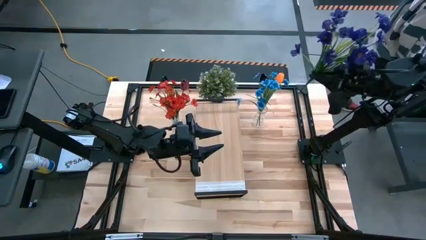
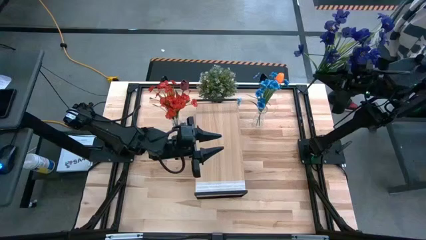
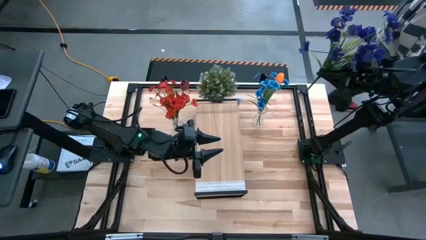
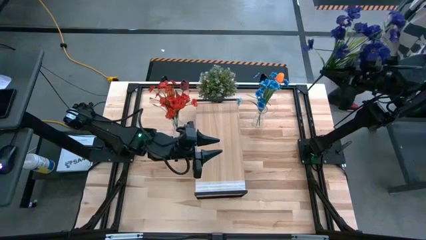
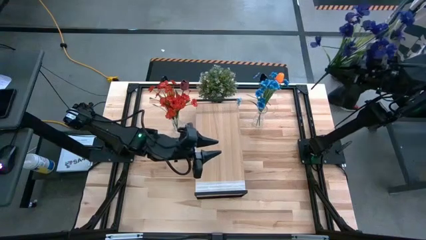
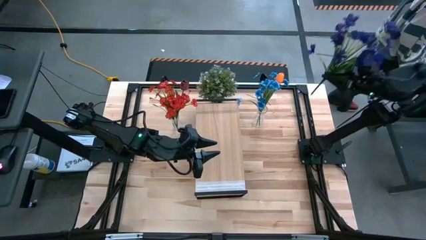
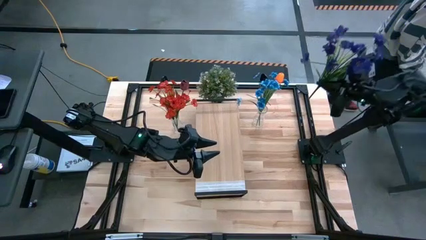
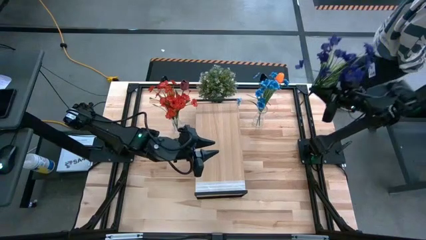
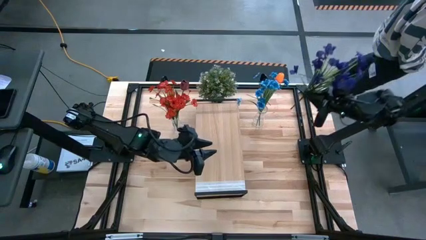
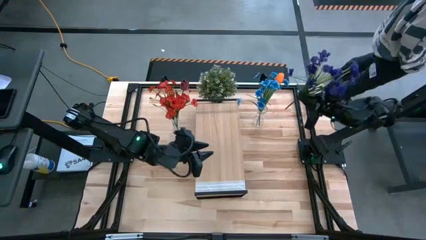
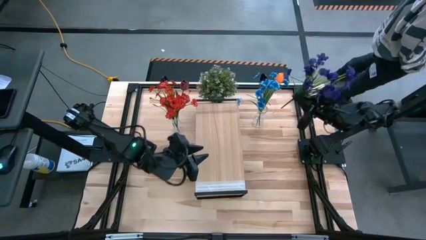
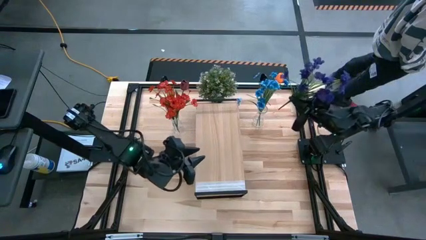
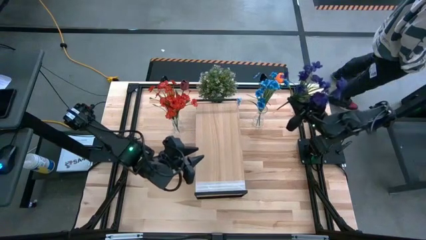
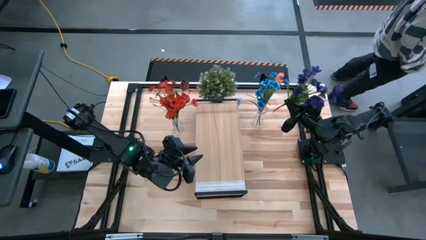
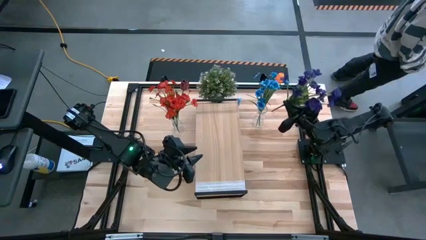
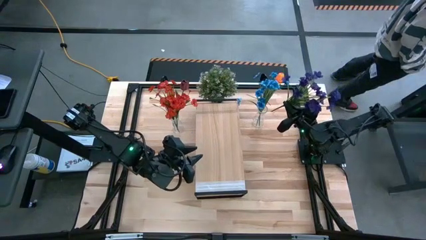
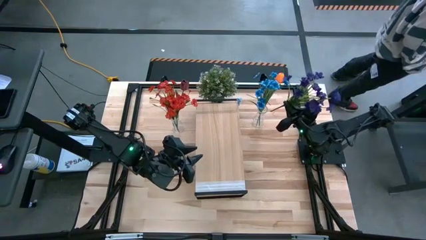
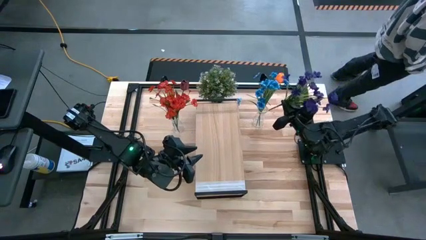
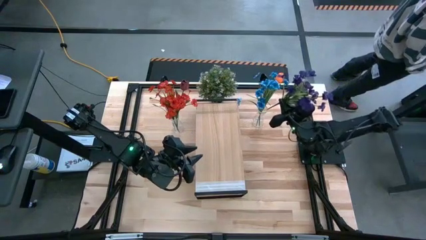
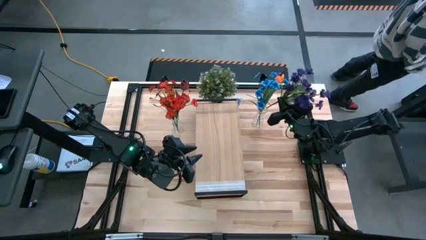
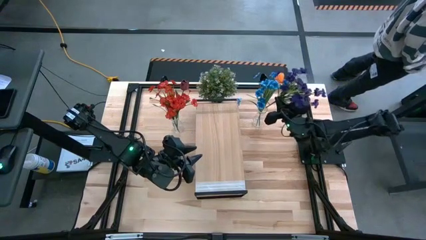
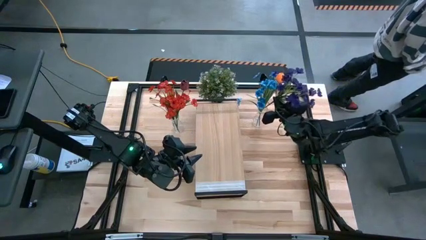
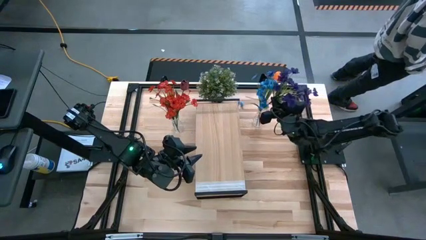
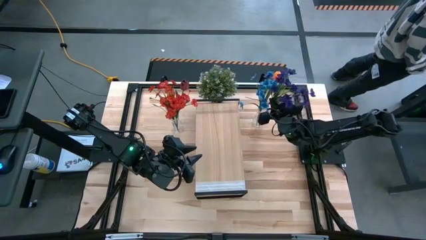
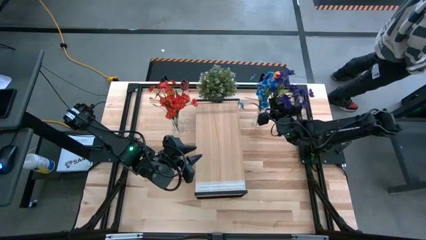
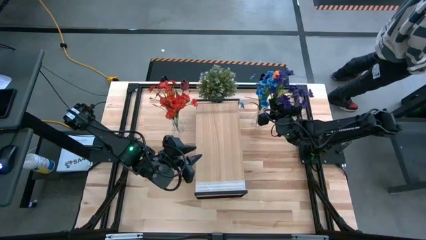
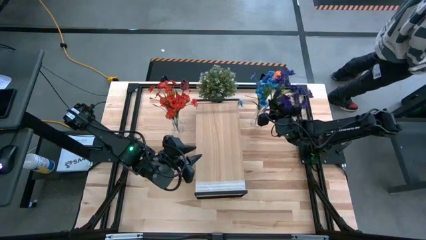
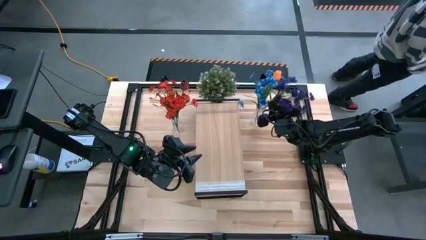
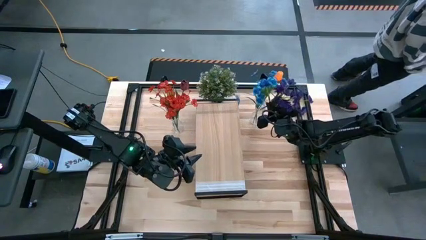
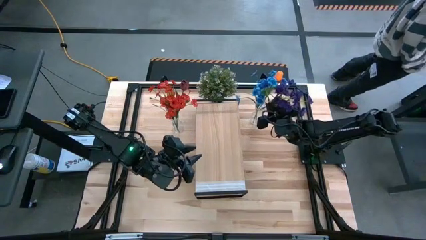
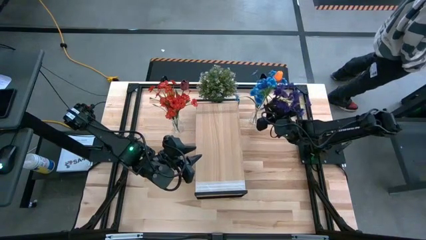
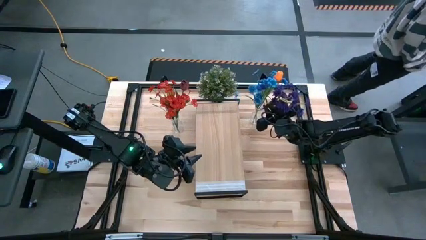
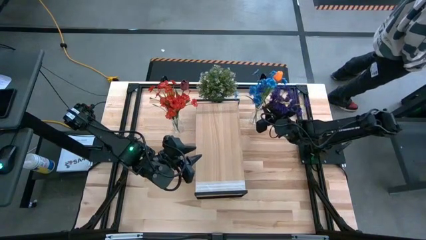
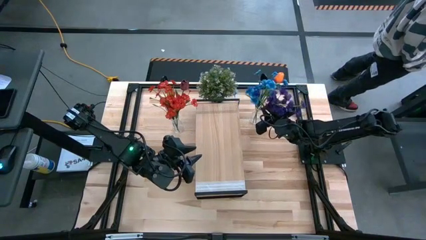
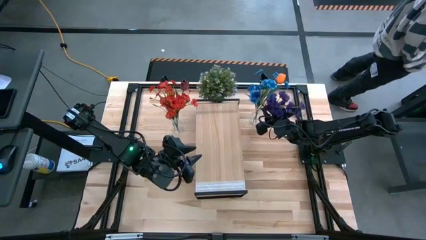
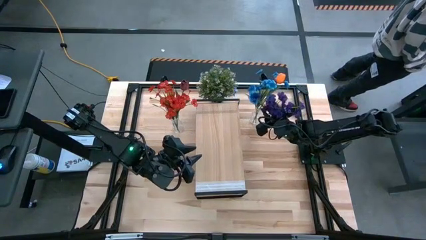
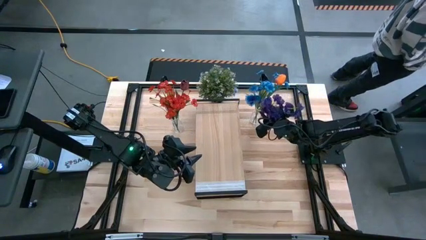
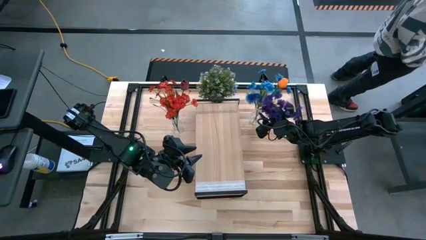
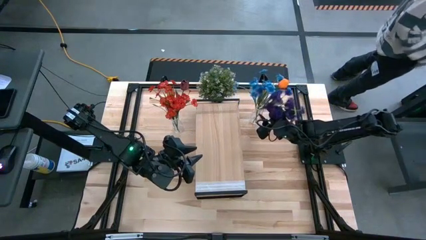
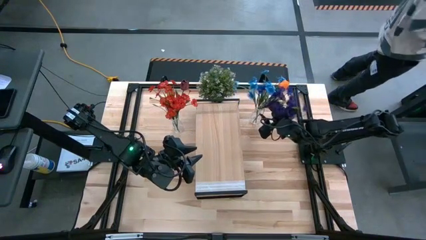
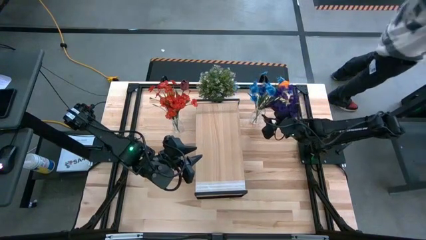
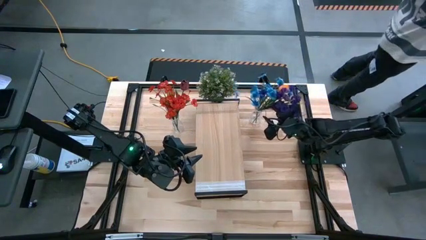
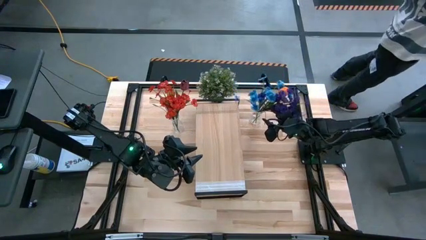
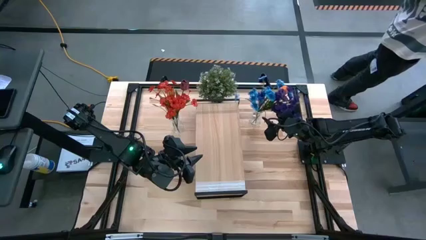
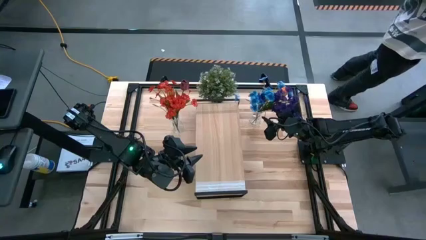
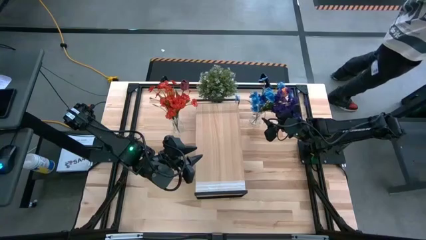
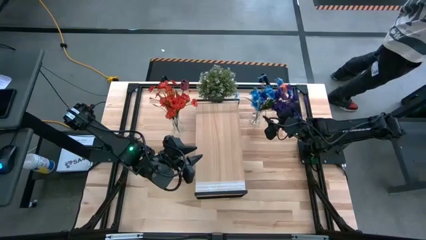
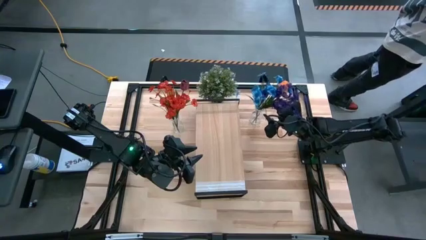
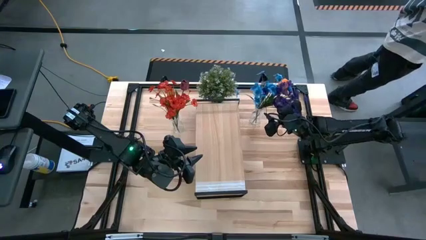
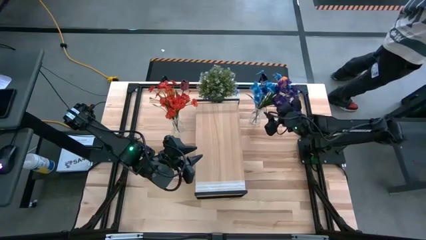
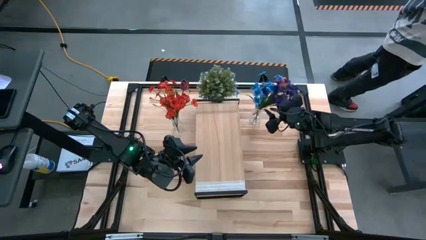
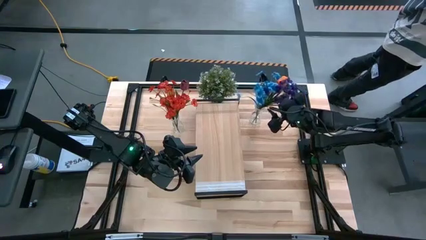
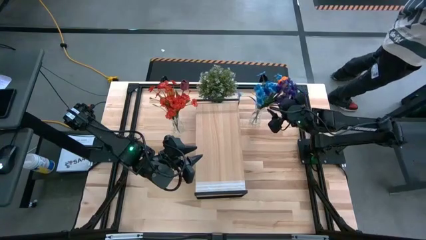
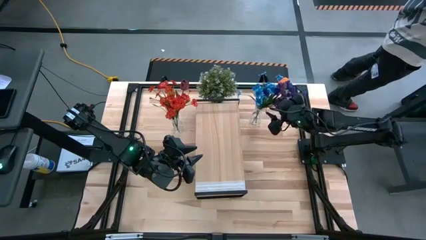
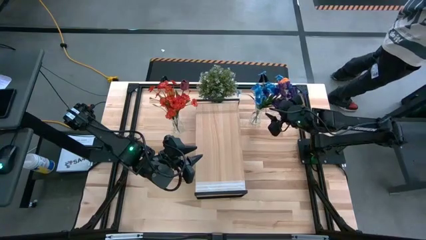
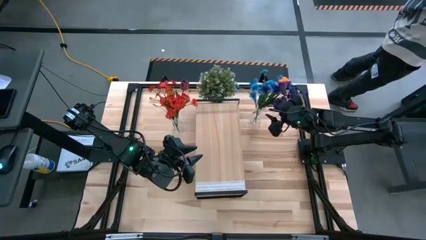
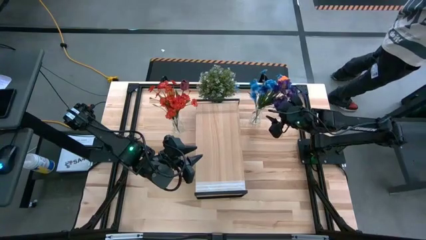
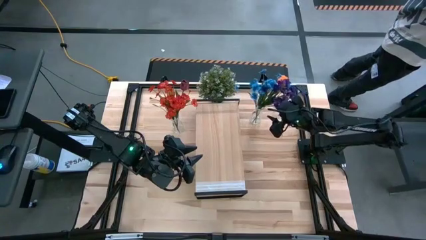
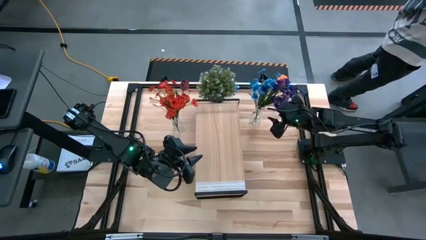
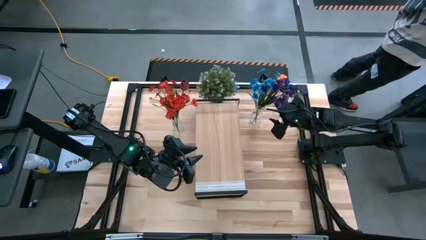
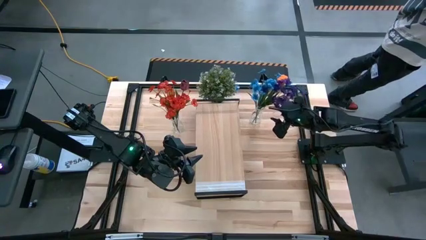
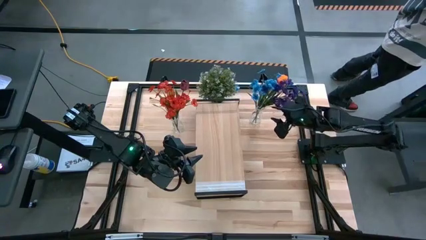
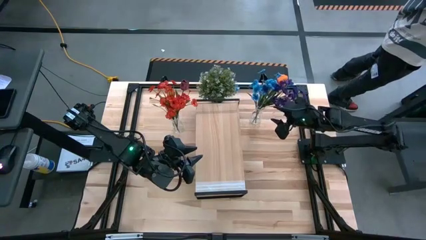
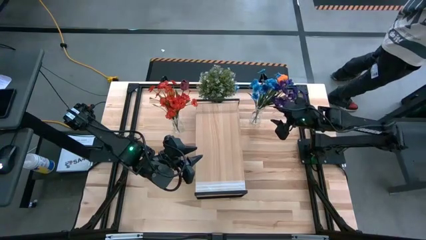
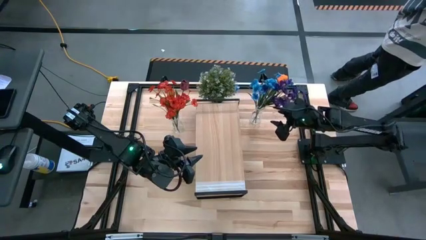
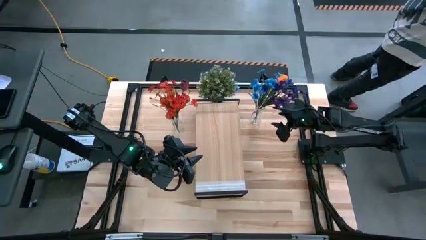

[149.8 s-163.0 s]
Task: Pick and place flowers into a vace then onto a shelf
Put the violet flowers into the right transparent vase
